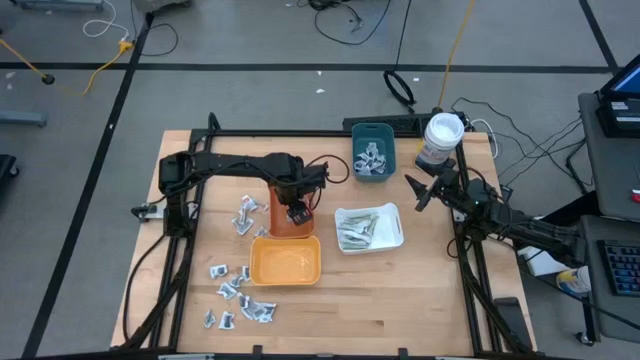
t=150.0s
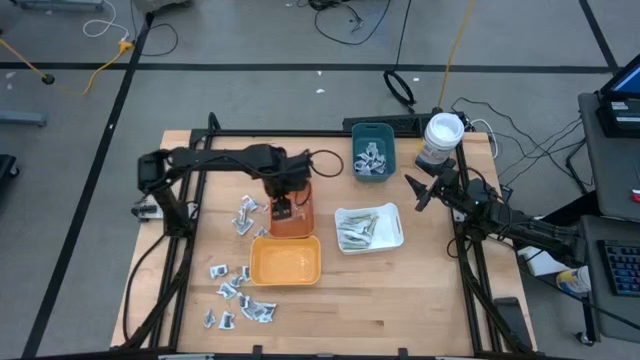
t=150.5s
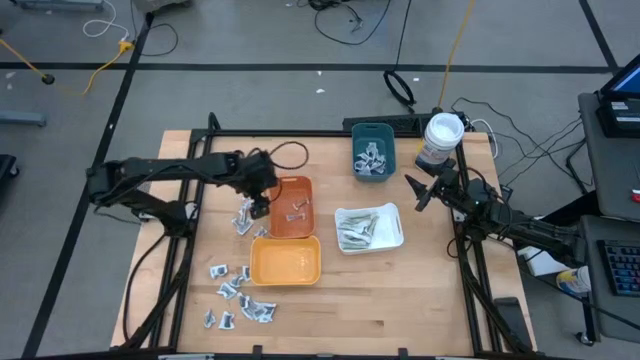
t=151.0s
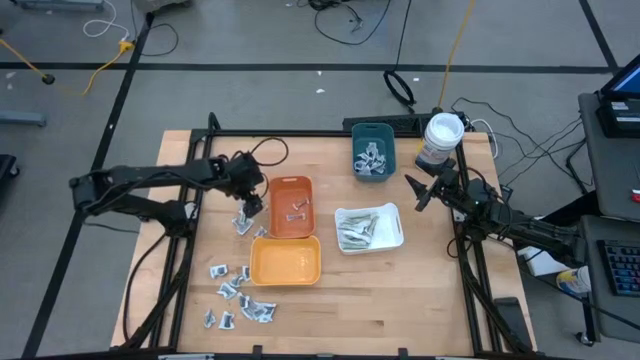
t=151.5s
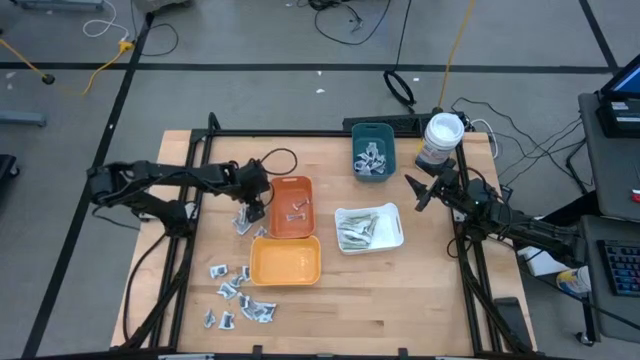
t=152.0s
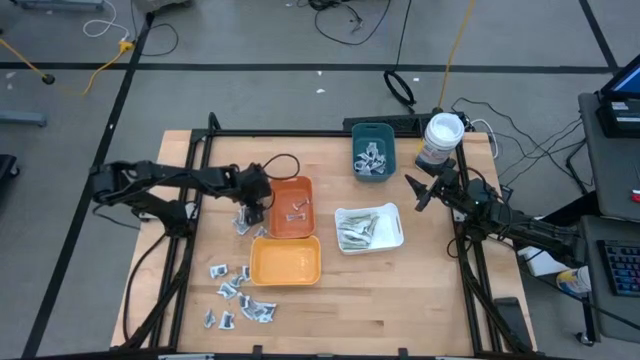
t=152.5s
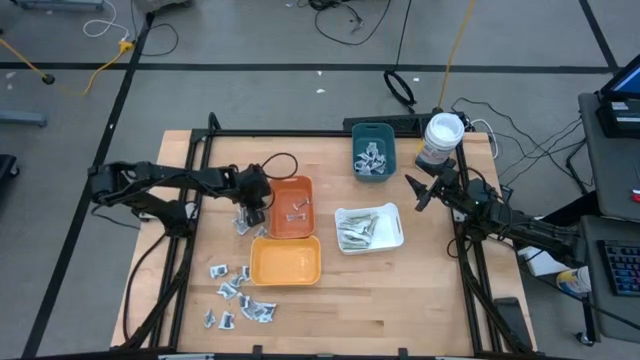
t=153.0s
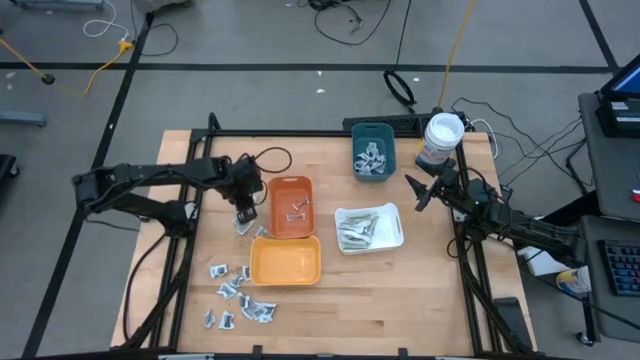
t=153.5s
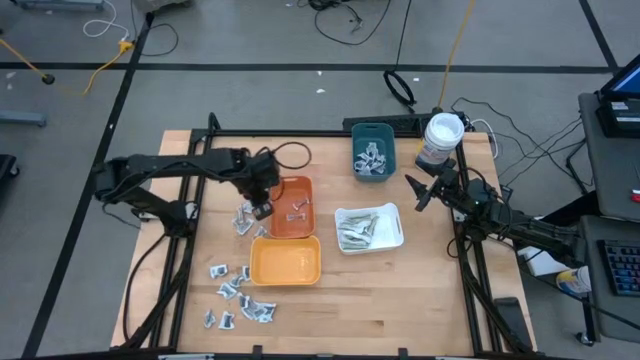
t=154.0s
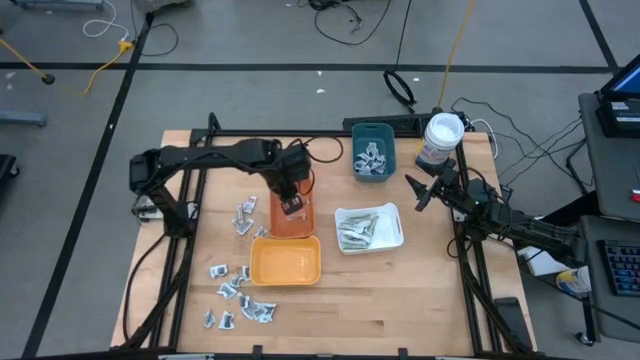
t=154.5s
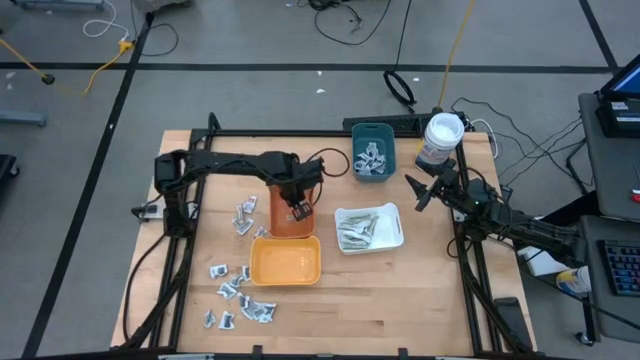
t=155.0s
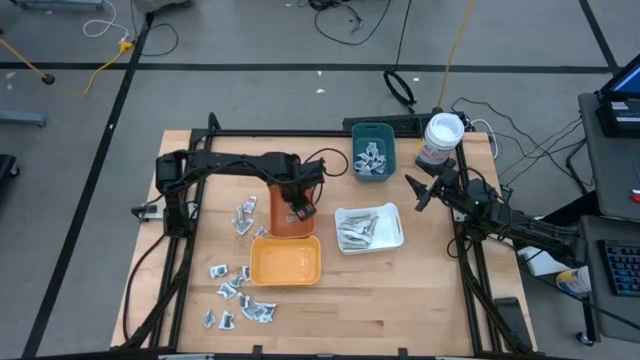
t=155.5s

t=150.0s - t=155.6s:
Task: Pick & Place First Aid Supplies
Put the orange sachet into the orange bin

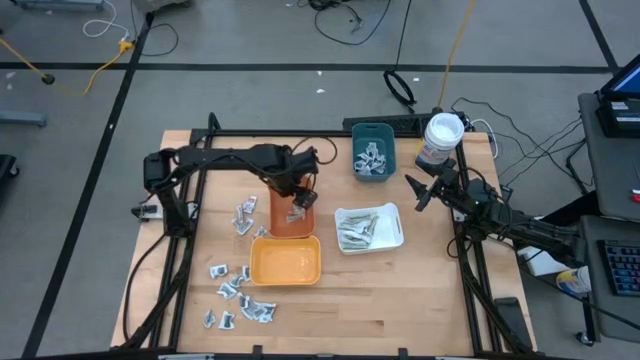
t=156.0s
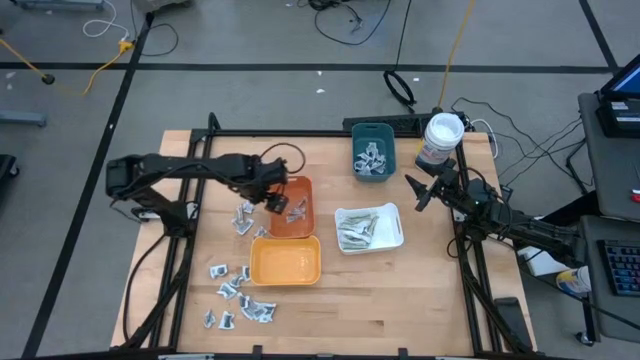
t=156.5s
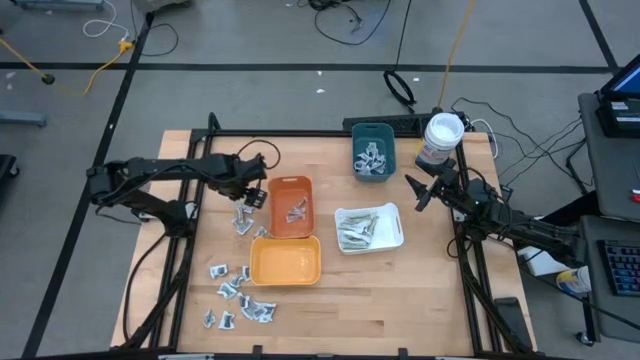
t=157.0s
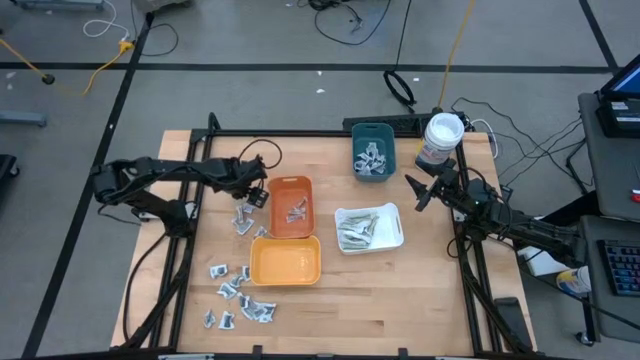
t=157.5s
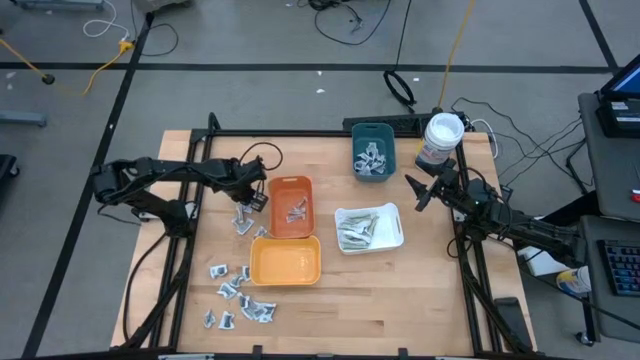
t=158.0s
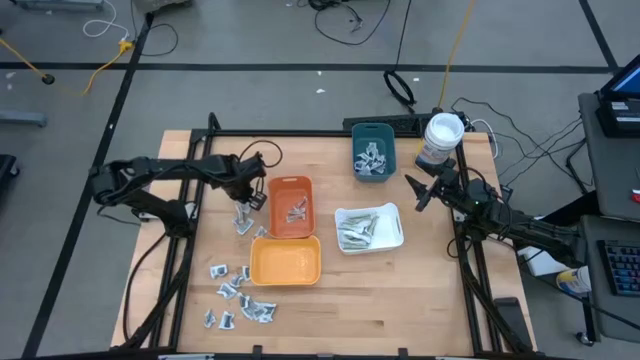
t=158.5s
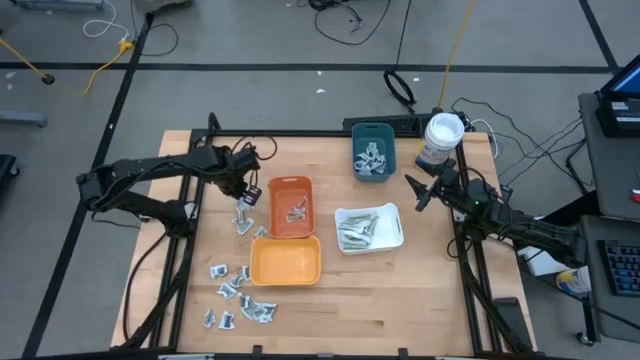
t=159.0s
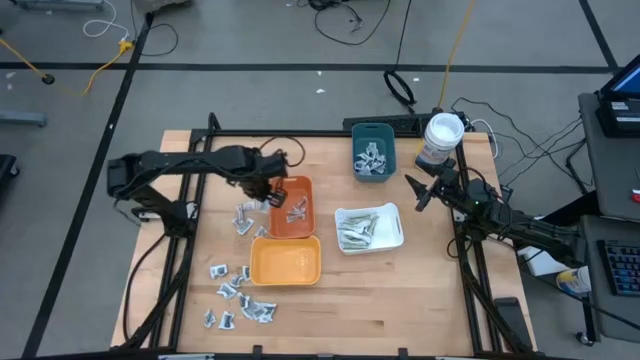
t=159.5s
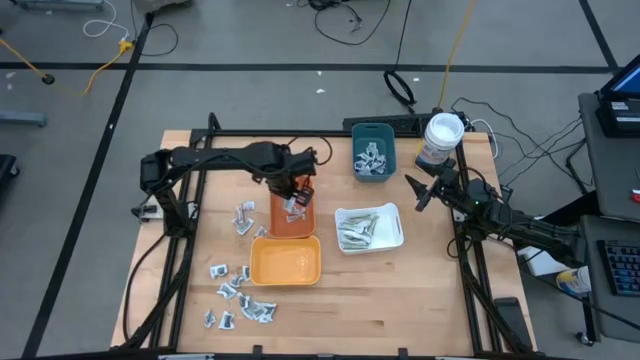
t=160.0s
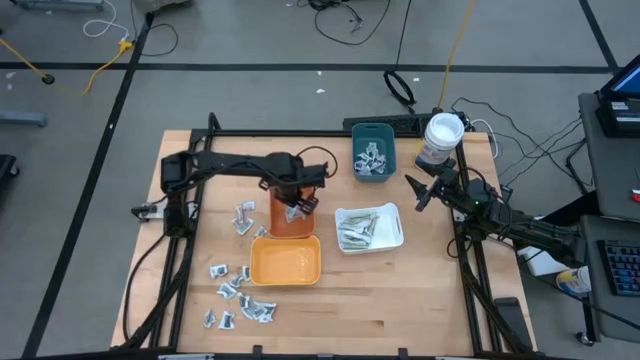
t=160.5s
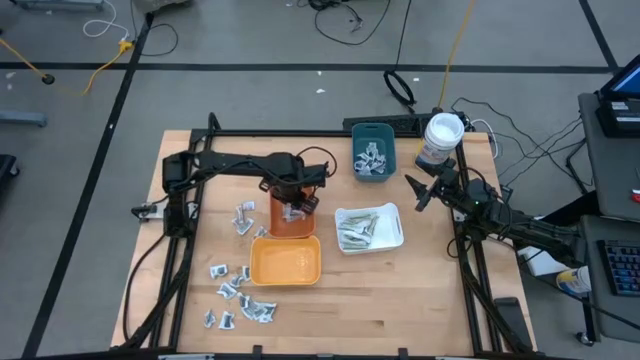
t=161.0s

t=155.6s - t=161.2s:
Put the orange sachet into the orange bin

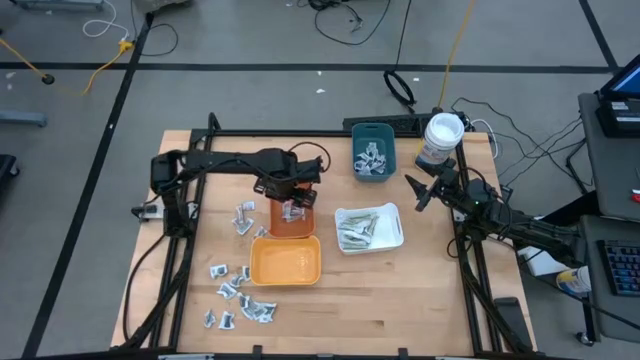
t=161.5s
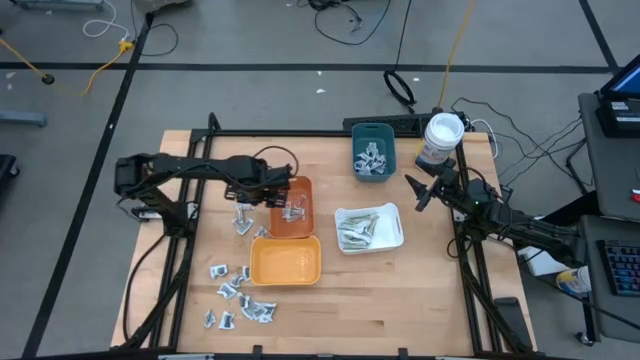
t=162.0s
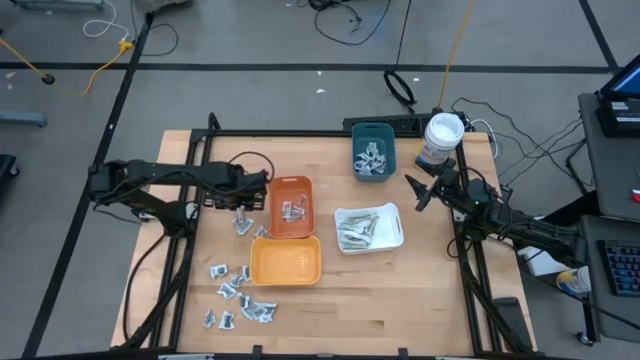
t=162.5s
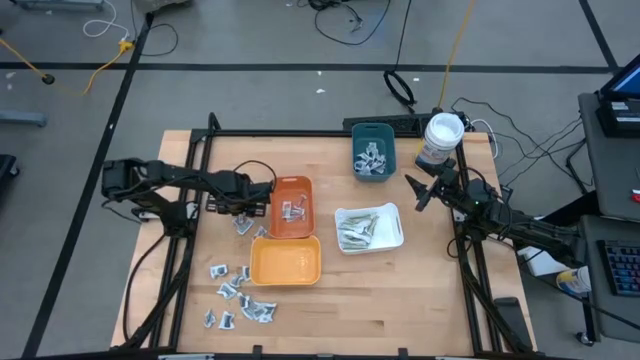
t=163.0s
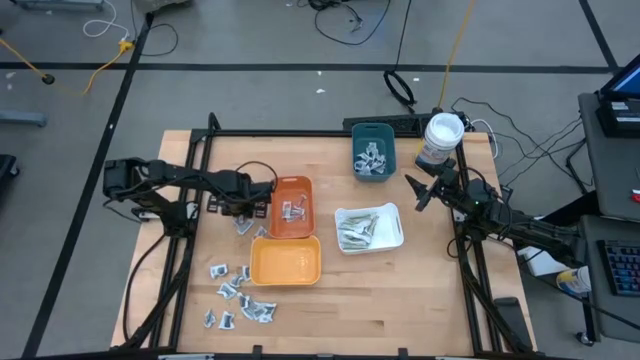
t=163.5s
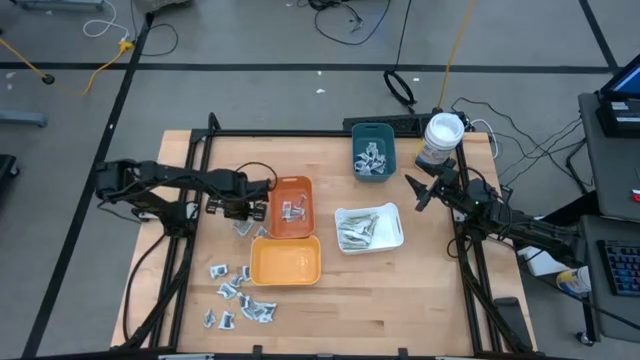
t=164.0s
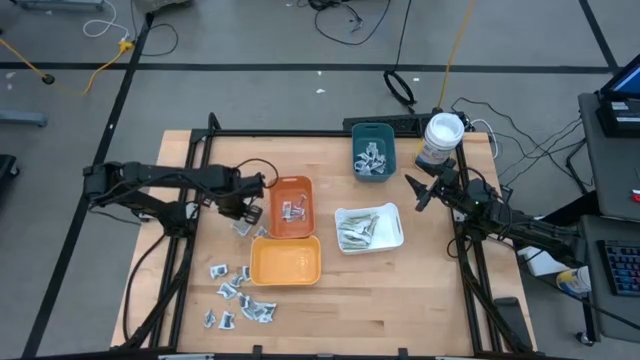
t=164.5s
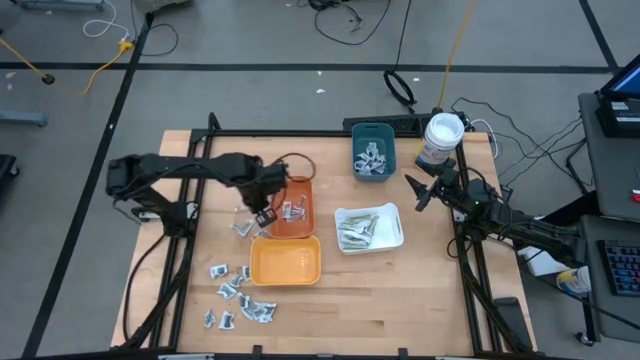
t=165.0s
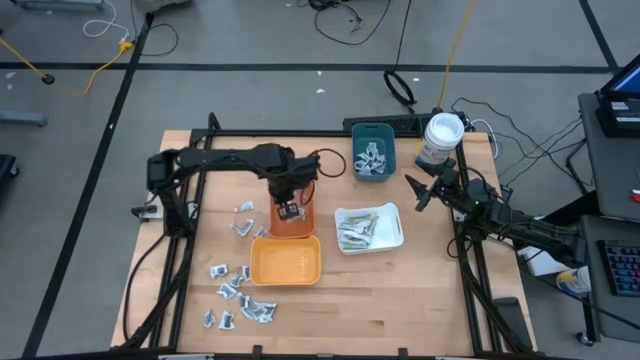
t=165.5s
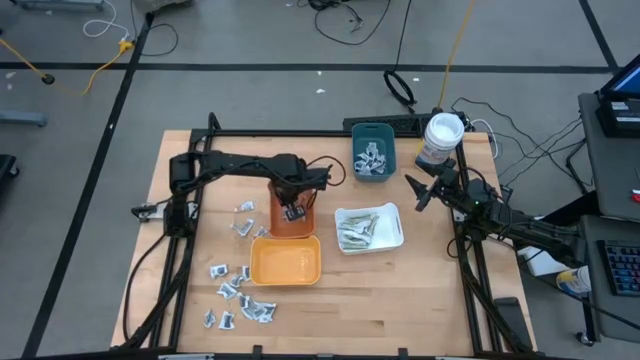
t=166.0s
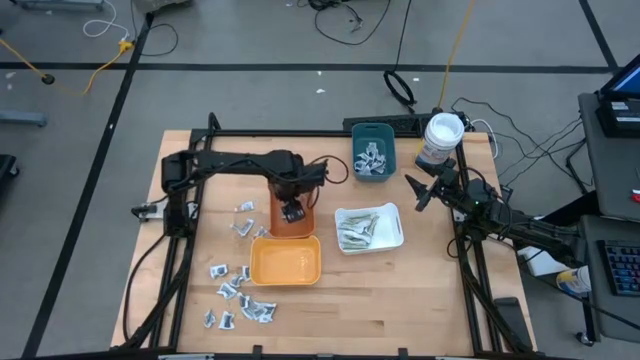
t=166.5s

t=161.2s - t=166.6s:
Put the orange sachet into the orange bin

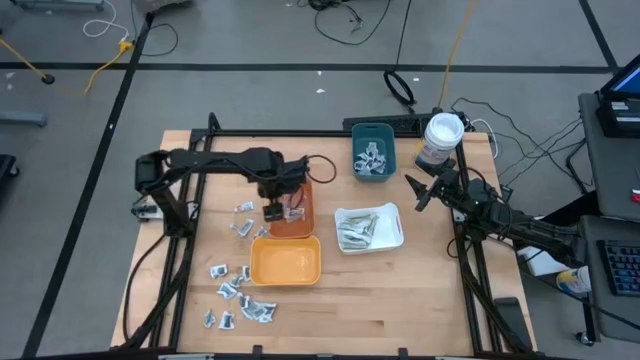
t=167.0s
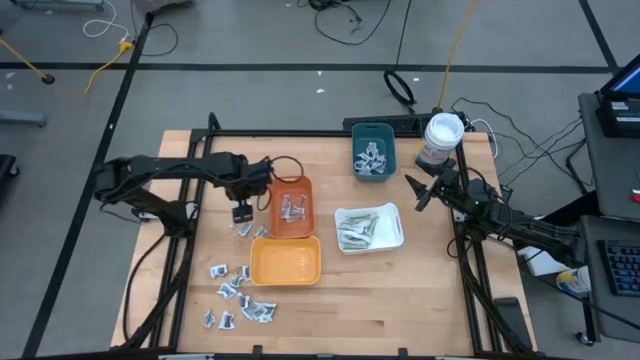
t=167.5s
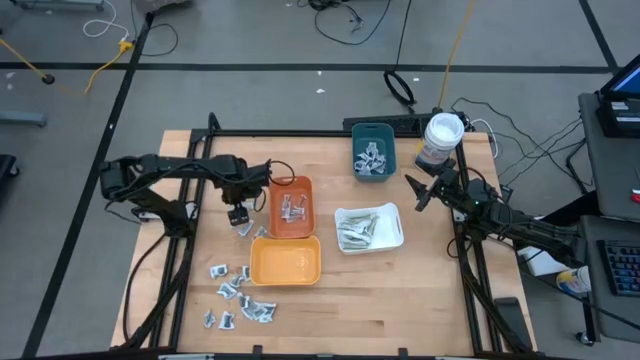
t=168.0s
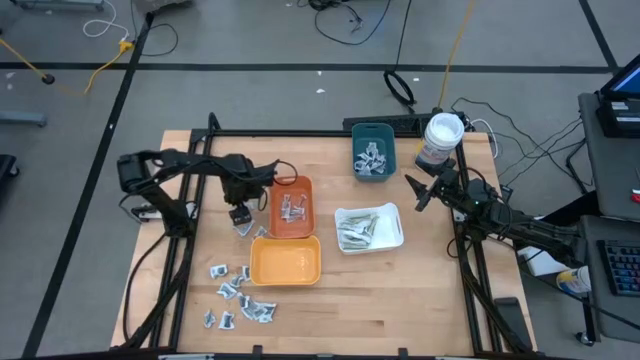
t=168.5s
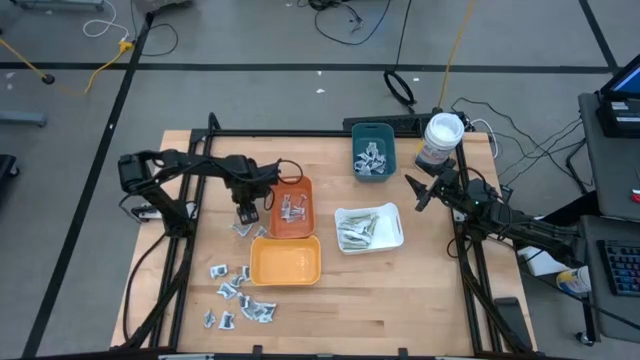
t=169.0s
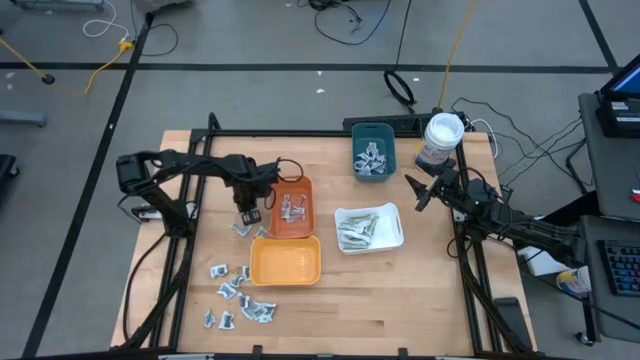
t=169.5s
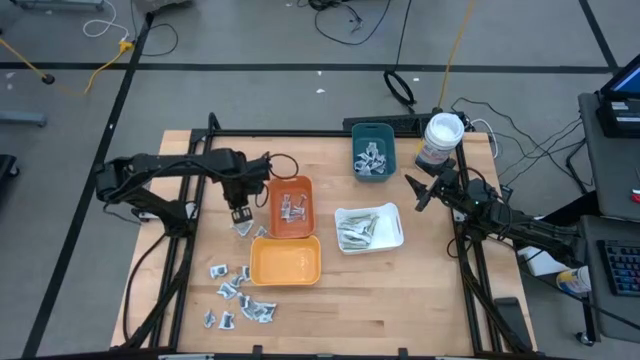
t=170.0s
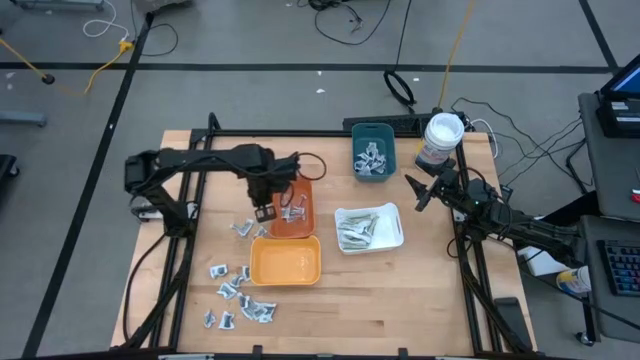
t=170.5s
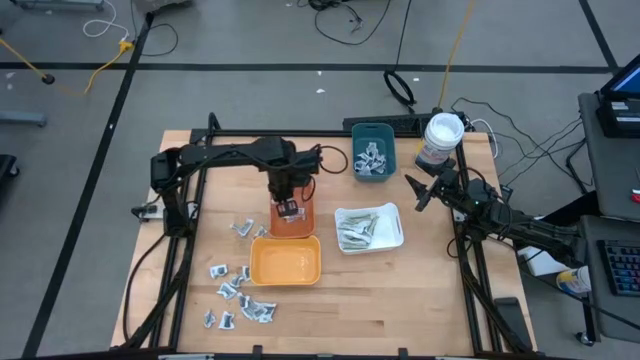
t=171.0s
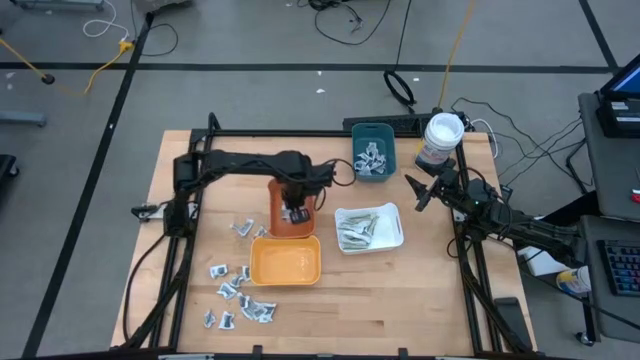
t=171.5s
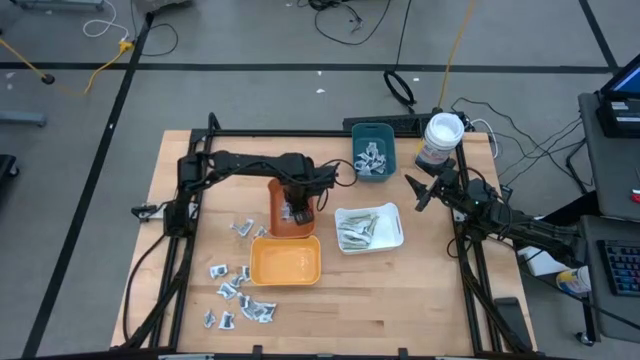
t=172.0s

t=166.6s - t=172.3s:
Put the orange sachet into the orange bin
